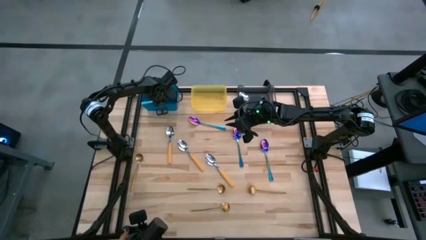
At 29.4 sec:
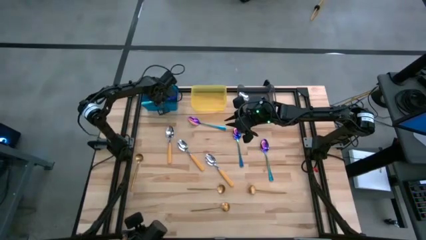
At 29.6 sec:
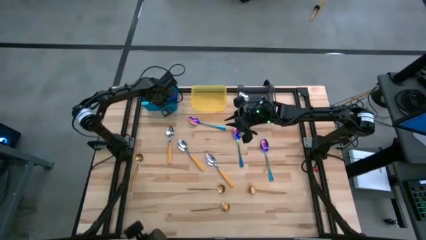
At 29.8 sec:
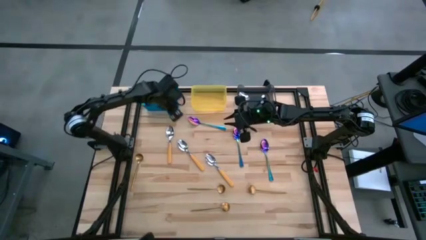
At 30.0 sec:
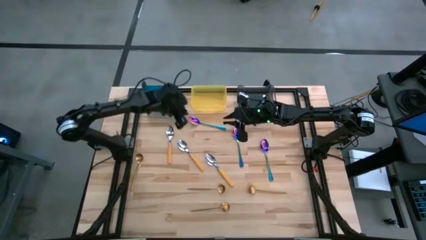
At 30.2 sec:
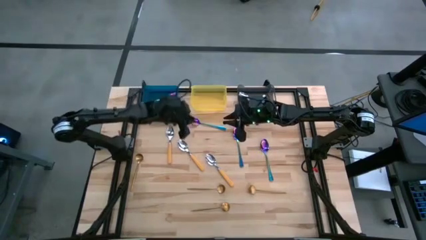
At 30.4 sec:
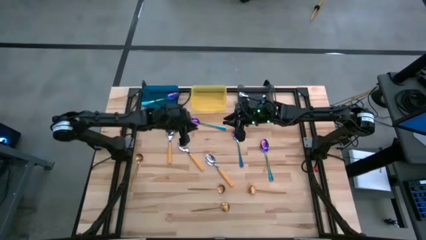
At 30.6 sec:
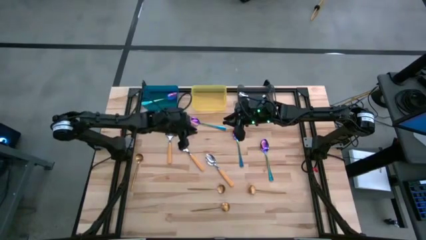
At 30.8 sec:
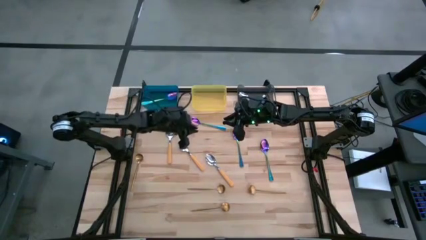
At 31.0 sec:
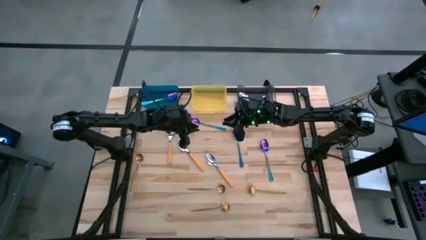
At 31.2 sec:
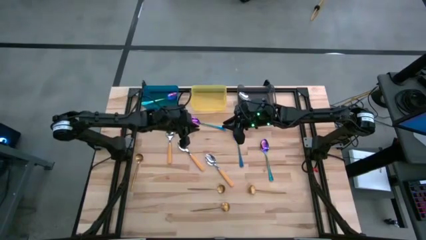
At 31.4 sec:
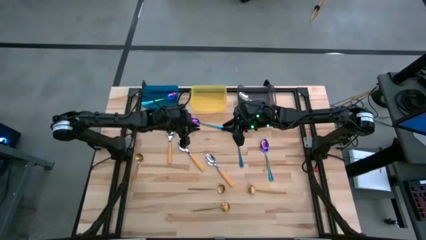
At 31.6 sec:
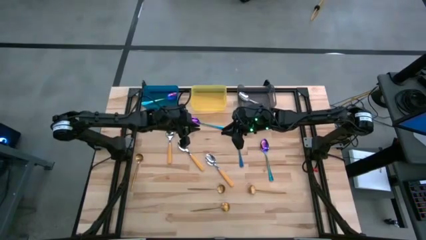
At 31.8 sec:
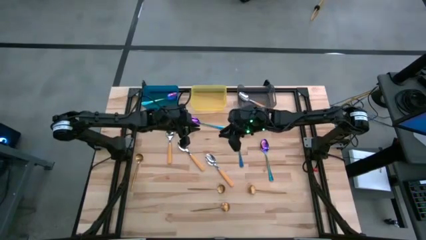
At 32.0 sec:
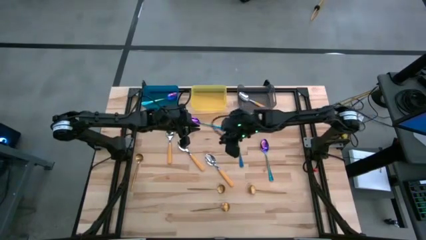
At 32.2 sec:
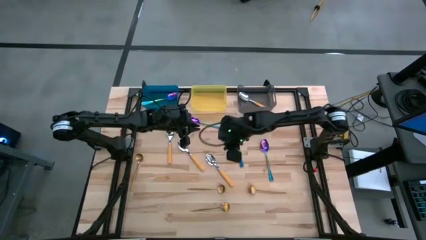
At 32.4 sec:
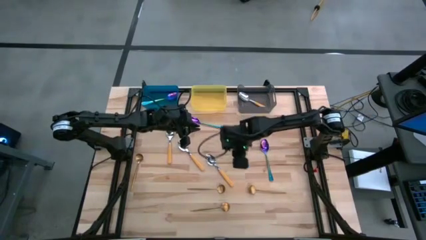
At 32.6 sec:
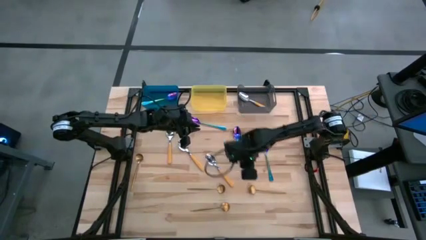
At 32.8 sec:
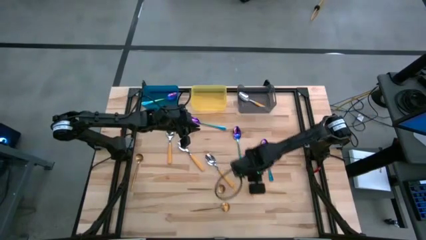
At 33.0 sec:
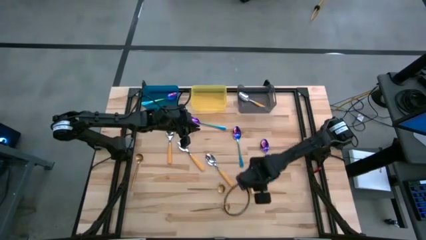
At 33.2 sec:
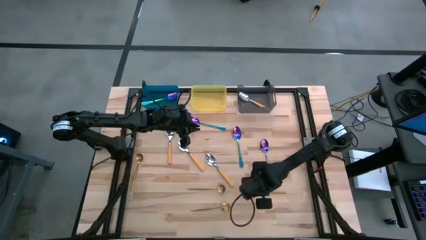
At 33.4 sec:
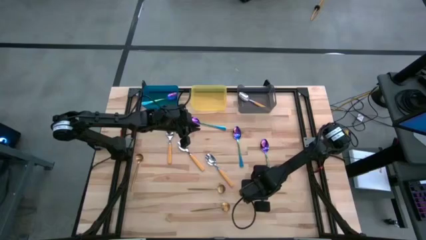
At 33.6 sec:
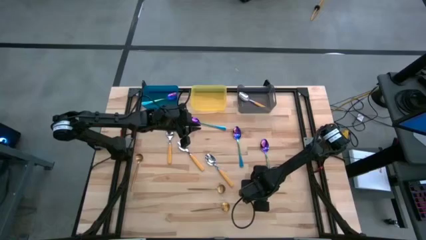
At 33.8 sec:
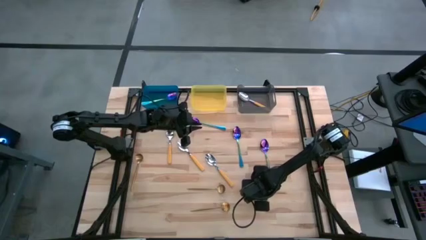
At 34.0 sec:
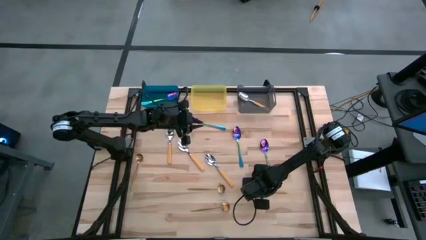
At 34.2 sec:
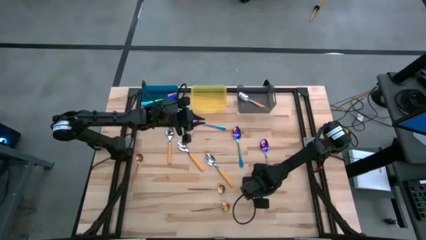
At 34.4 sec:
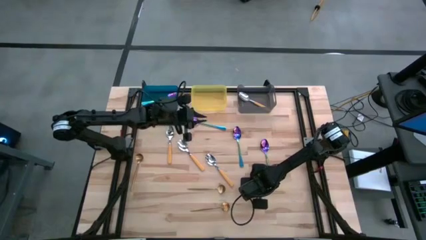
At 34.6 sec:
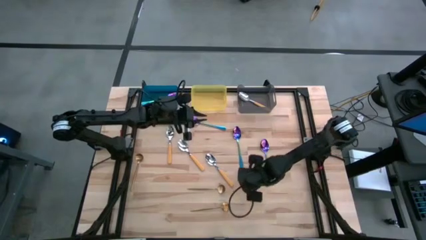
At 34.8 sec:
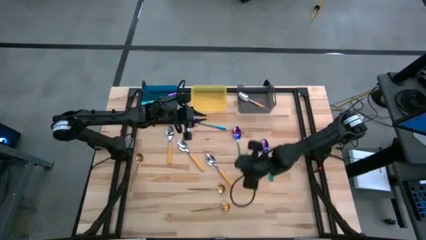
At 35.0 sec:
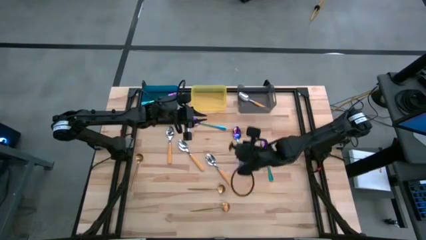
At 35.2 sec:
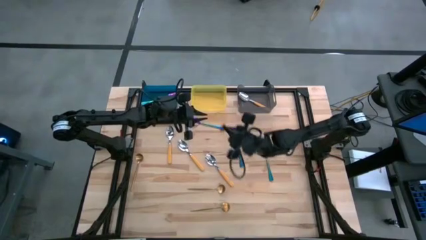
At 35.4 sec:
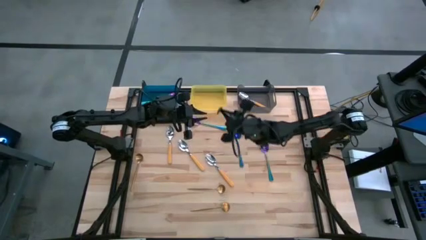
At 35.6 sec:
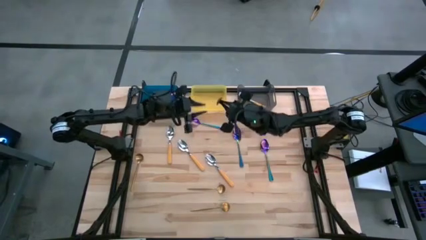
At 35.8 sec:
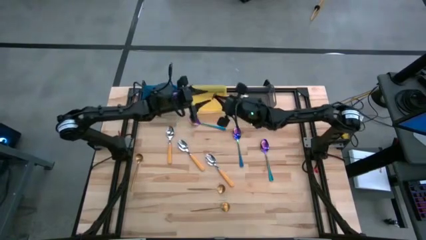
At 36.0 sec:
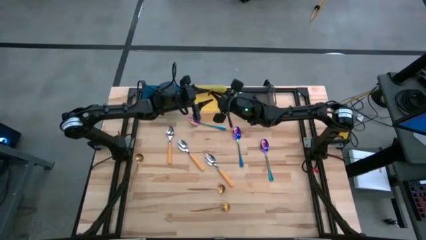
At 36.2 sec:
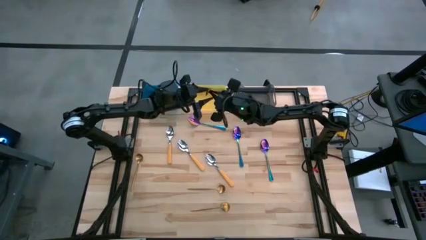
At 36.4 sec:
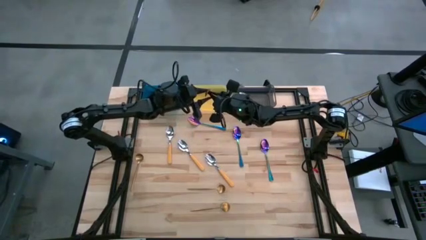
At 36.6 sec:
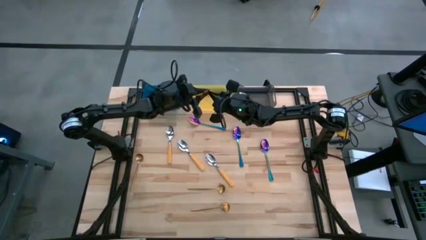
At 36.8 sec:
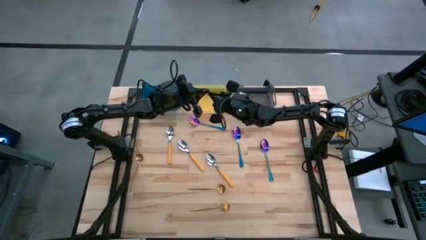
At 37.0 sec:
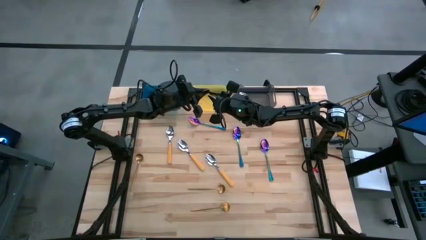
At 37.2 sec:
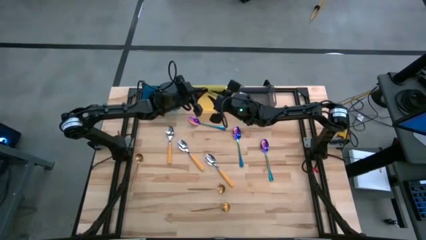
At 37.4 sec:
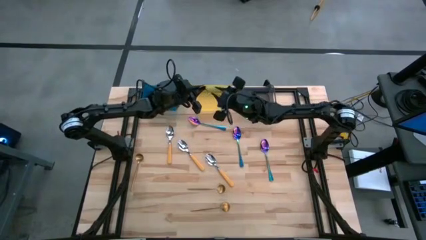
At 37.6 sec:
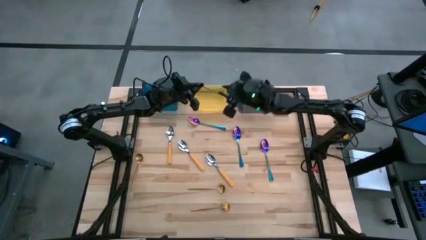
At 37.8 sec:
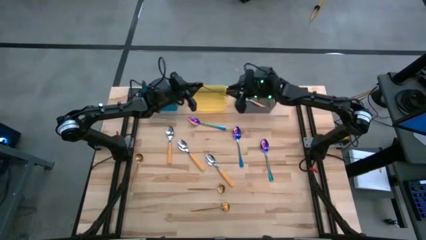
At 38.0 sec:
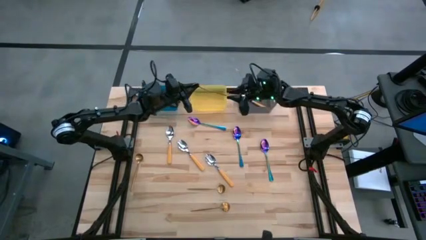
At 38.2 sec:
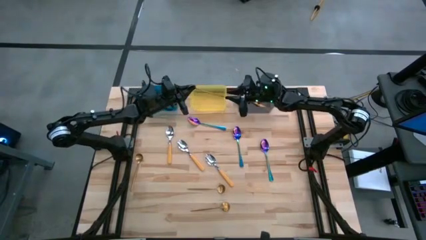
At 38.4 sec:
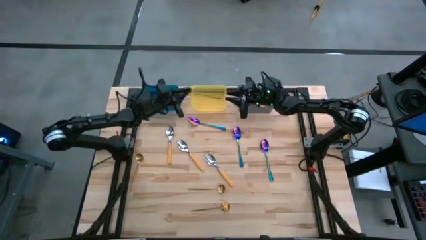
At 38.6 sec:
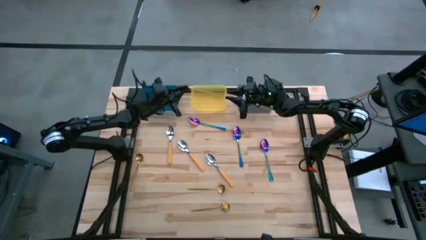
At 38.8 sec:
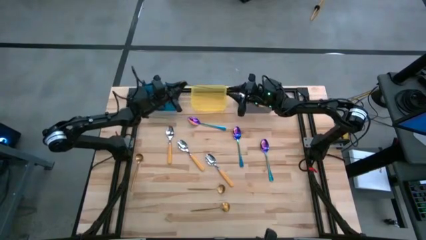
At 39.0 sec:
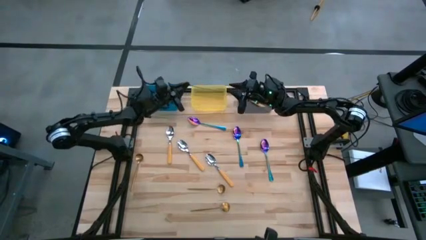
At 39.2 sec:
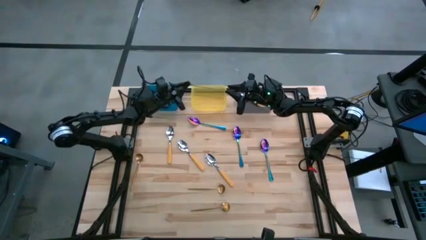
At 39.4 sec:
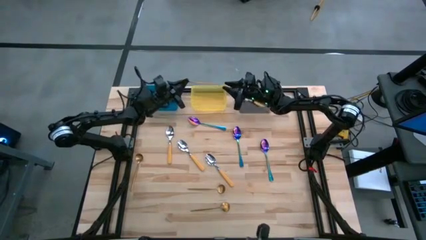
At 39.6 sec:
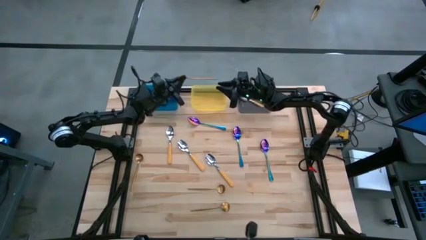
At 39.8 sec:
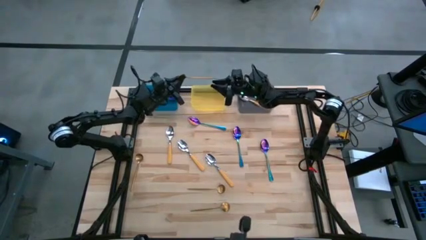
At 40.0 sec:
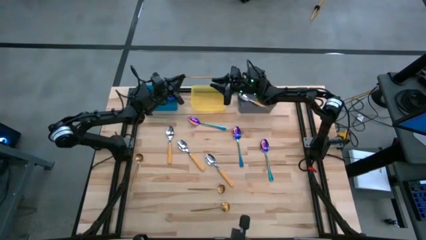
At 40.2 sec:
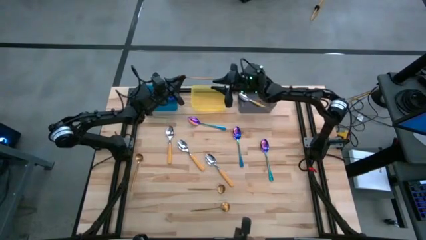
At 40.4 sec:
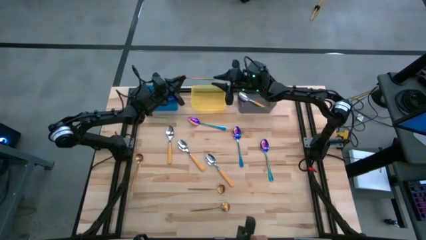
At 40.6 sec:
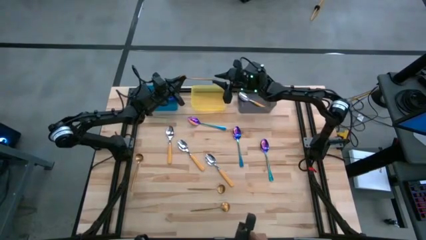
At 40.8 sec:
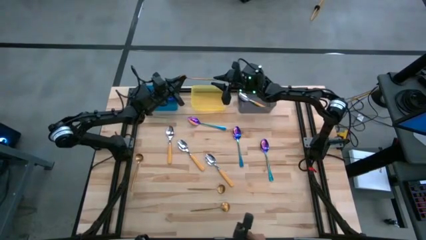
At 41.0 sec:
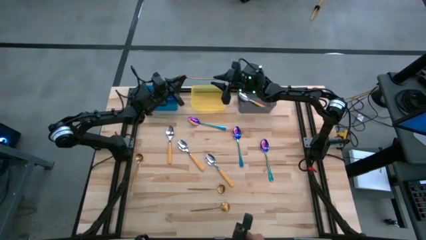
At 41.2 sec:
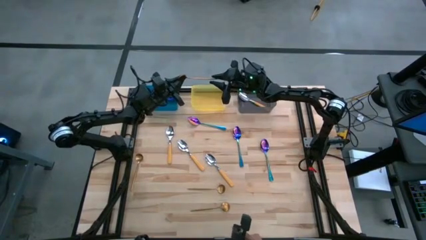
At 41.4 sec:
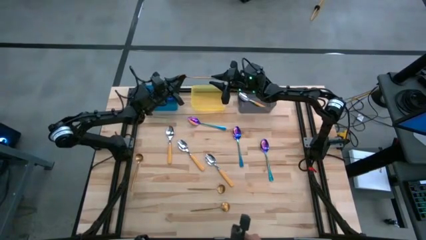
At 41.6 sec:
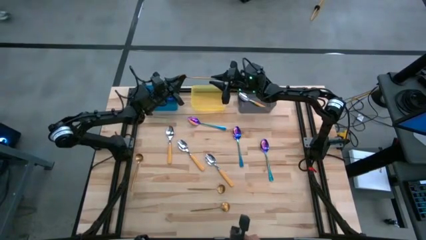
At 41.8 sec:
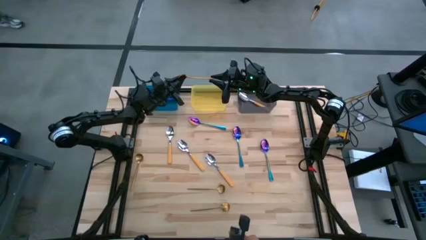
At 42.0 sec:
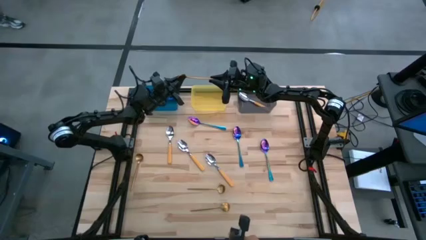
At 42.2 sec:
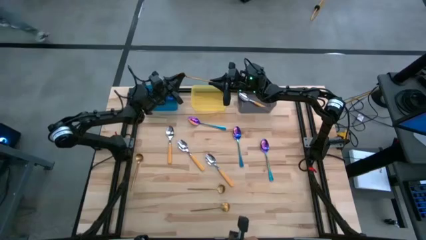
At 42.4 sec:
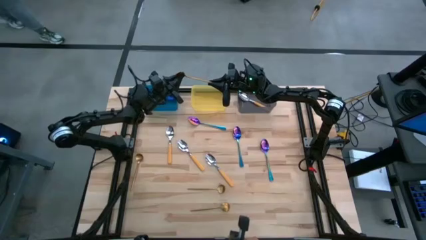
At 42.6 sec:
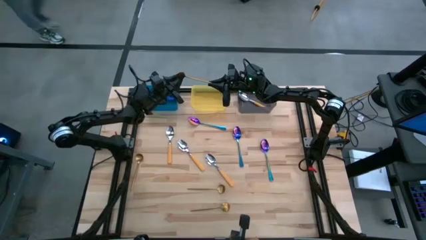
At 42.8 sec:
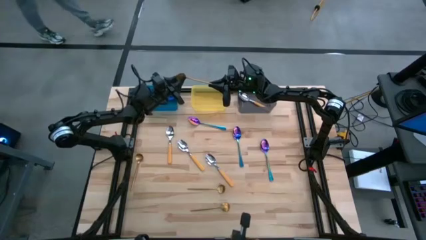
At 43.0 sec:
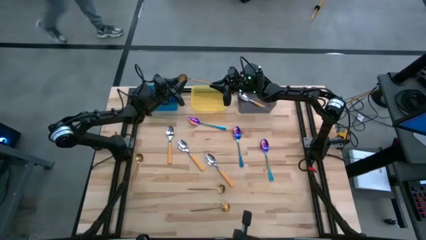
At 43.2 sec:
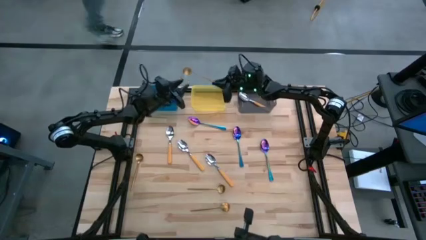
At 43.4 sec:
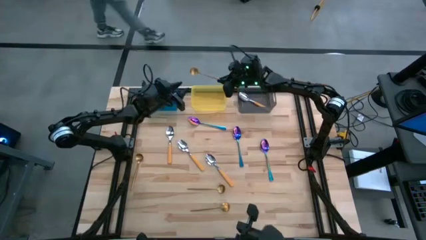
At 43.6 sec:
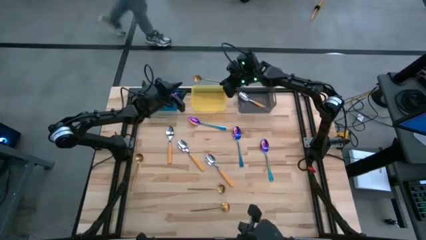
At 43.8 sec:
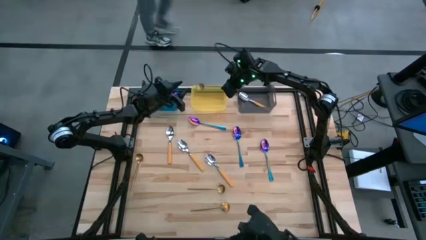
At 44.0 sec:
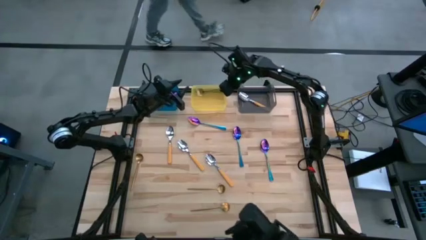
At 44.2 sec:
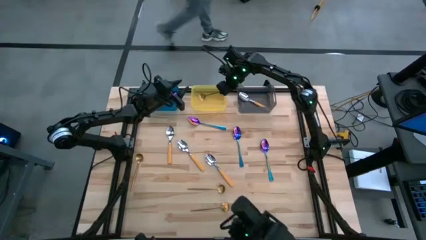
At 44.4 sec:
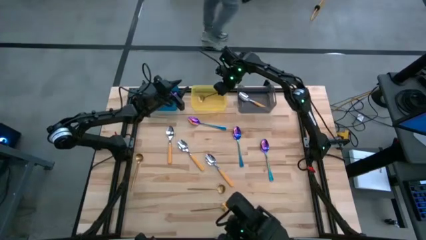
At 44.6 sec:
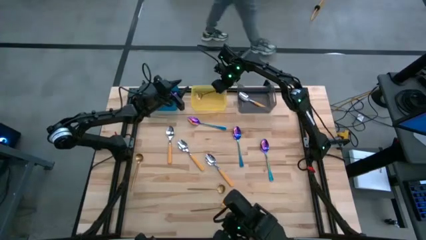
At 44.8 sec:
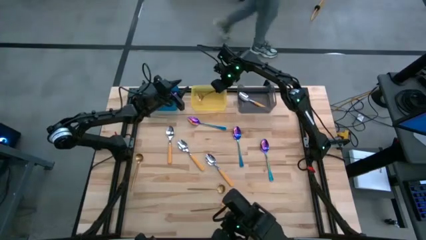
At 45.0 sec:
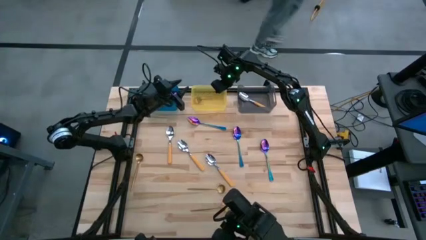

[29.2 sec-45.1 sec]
Task: Sort silverware by color (type)
Put the gold spoon into the yellow bin
